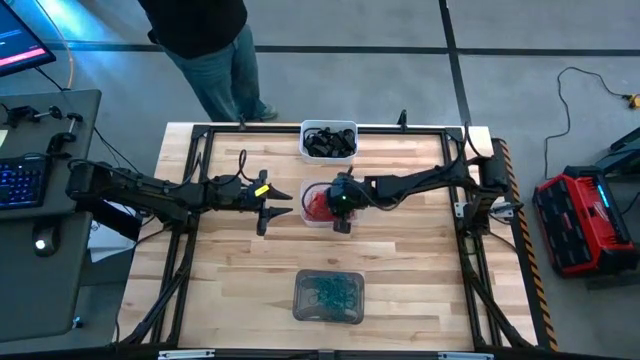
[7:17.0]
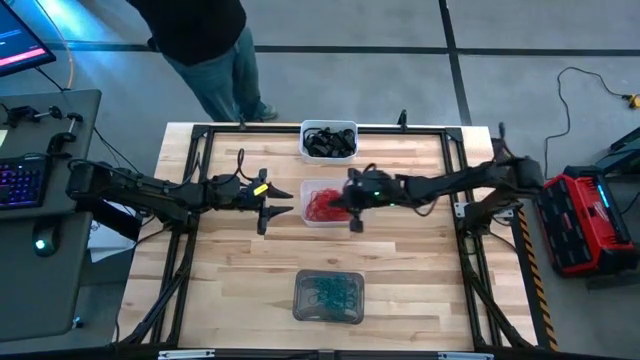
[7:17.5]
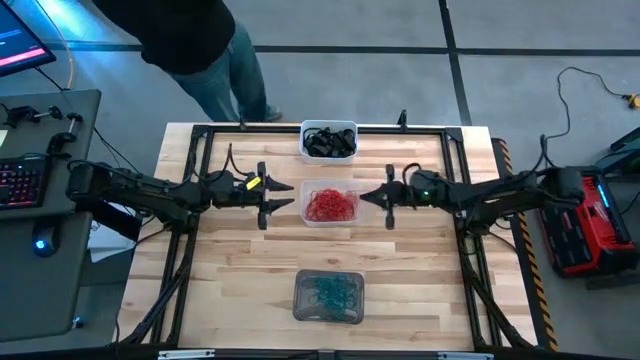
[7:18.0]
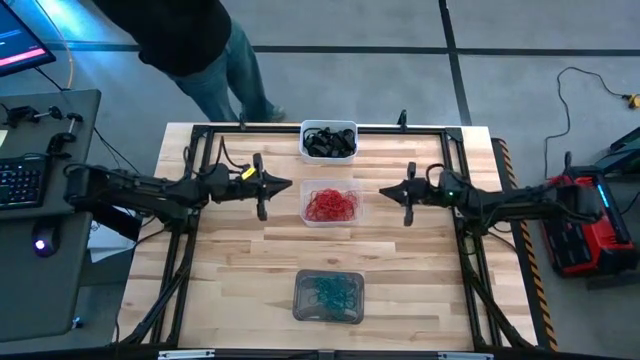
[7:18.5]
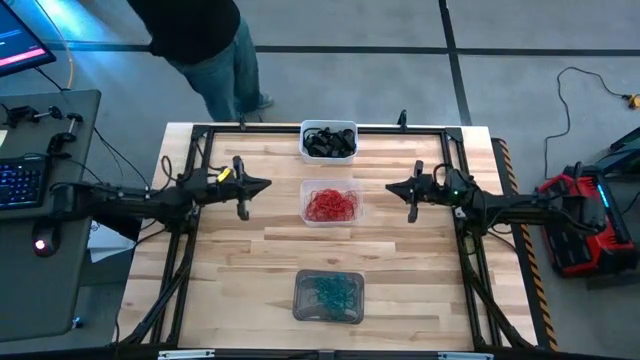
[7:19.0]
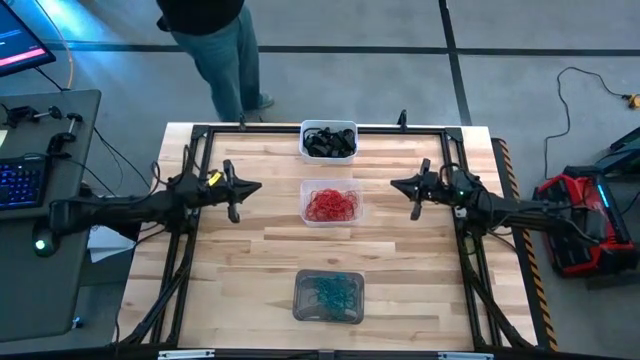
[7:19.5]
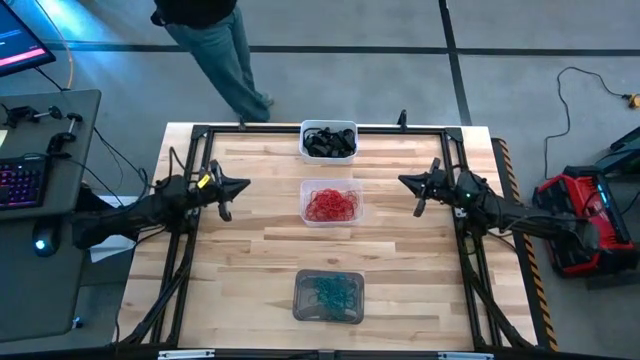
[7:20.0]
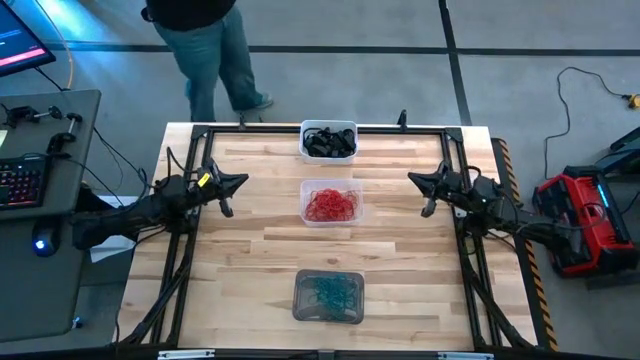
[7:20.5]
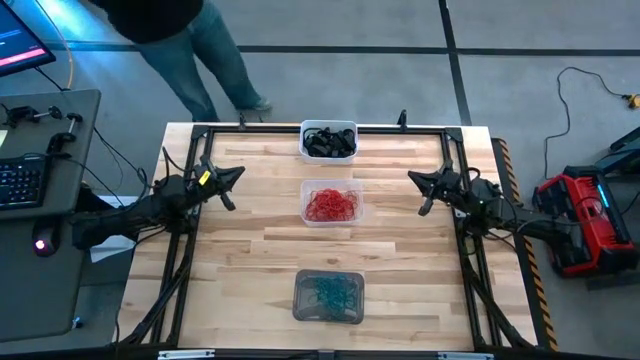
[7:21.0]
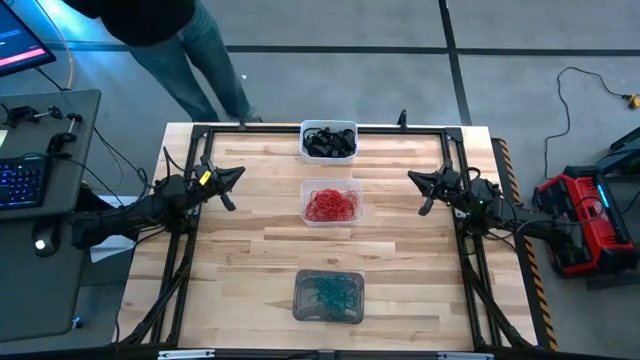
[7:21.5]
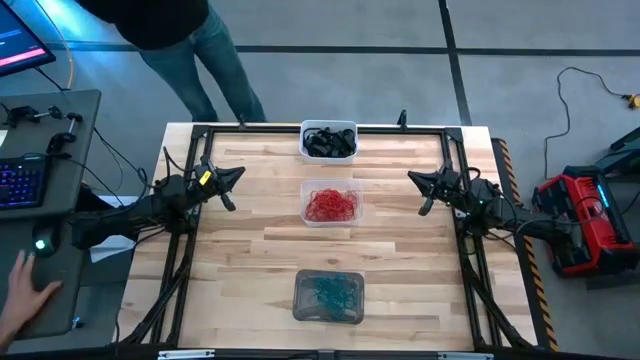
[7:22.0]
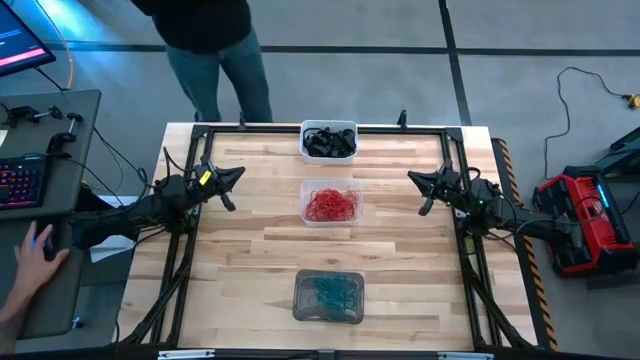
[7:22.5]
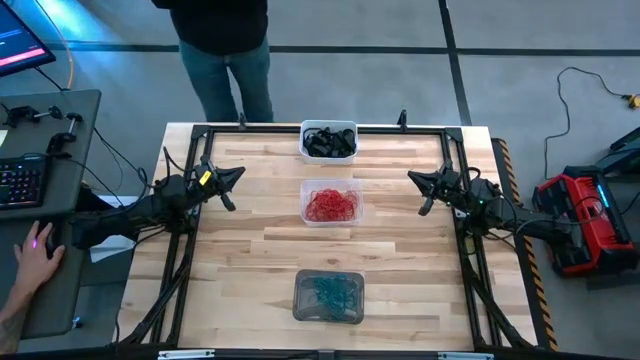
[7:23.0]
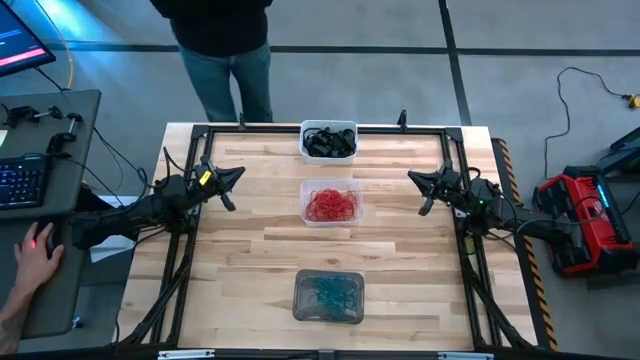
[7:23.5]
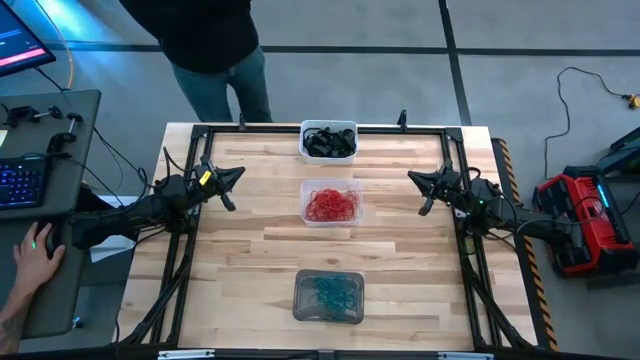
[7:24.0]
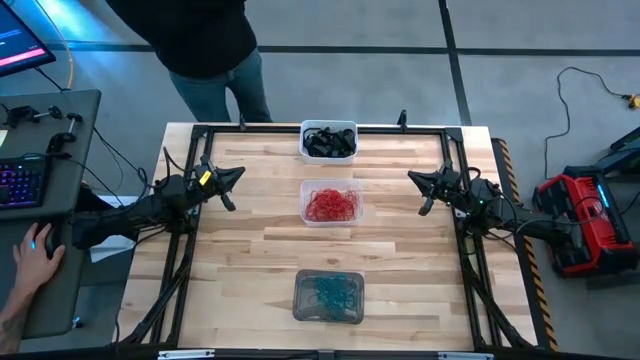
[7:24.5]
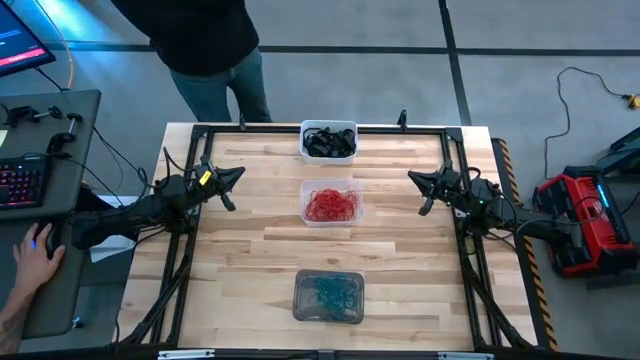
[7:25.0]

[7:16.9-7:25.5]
Task: Sort rubber bands into baskets
Return to Home Position

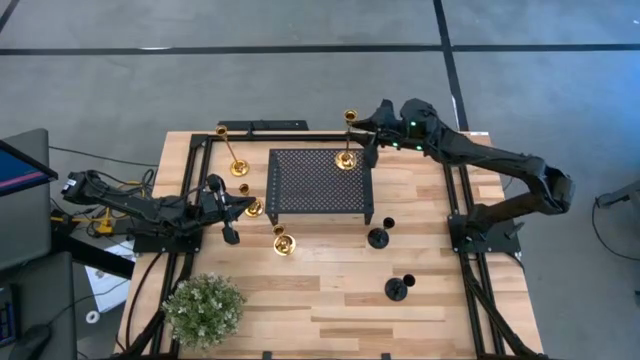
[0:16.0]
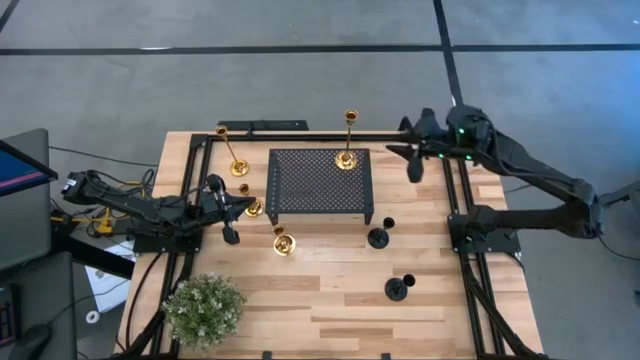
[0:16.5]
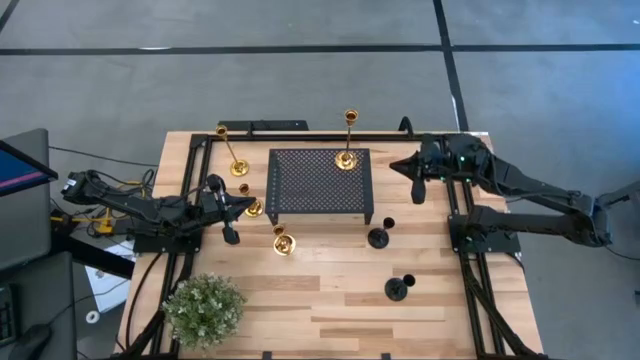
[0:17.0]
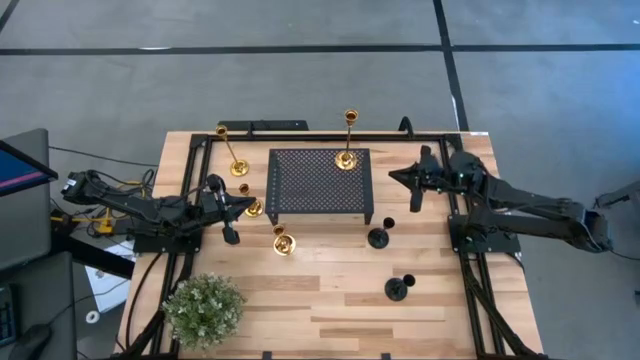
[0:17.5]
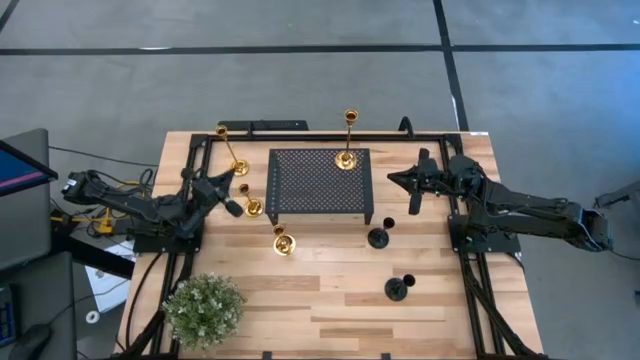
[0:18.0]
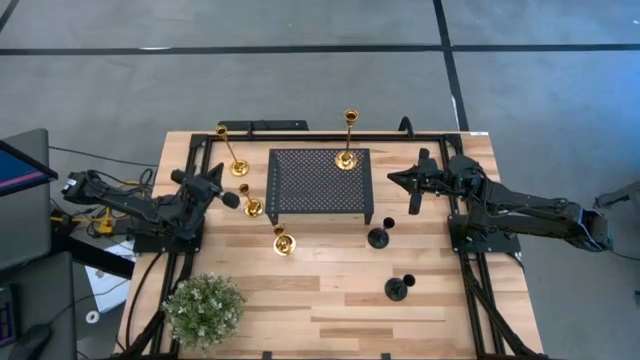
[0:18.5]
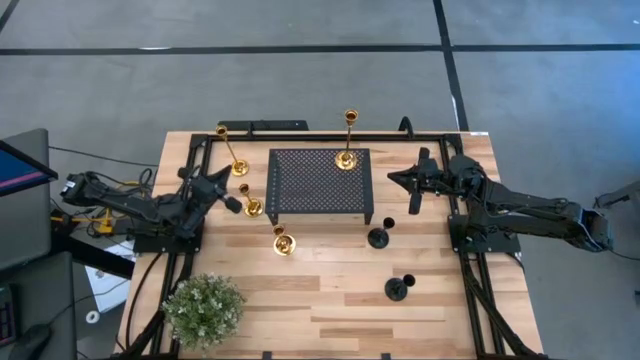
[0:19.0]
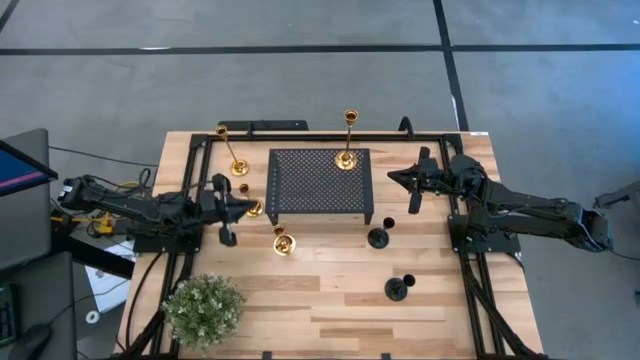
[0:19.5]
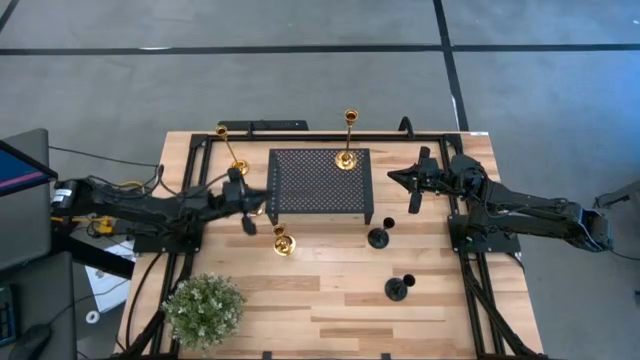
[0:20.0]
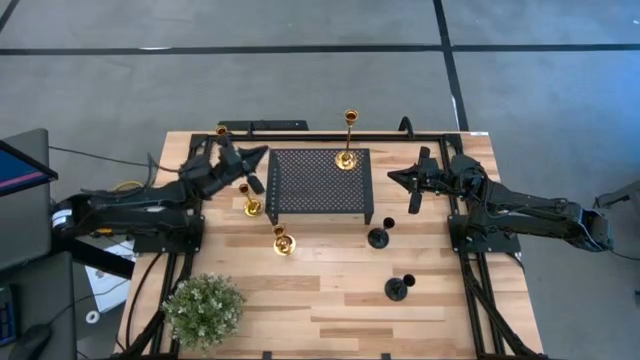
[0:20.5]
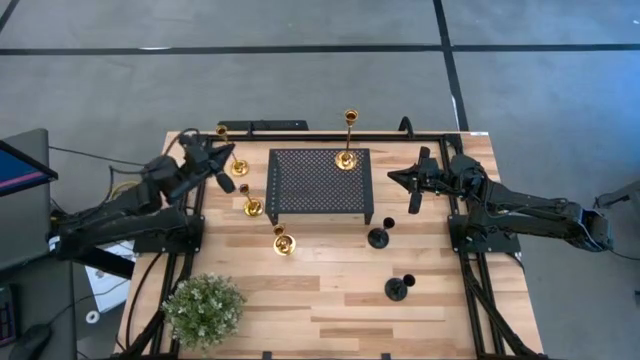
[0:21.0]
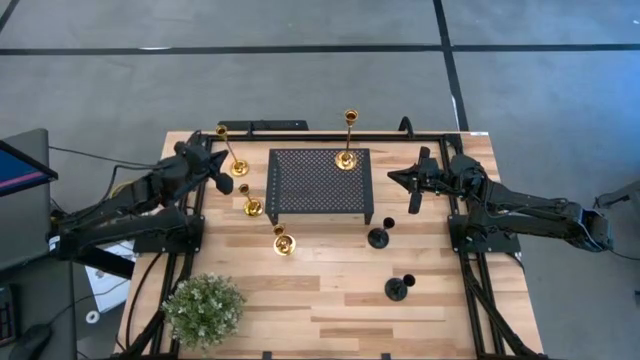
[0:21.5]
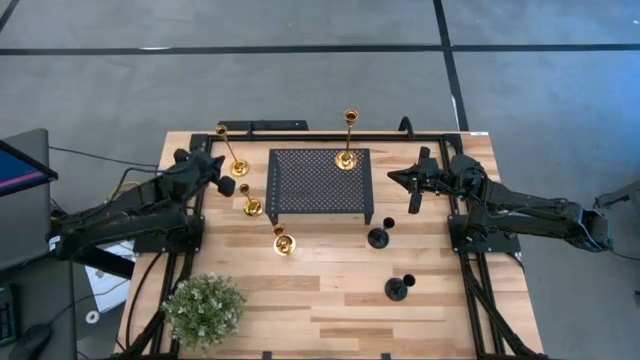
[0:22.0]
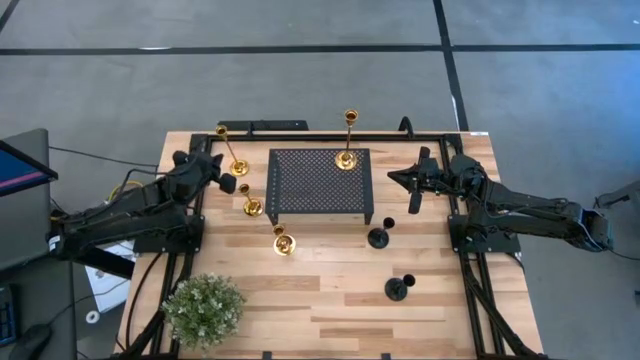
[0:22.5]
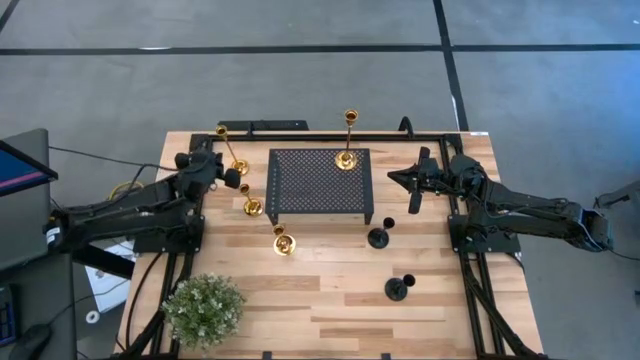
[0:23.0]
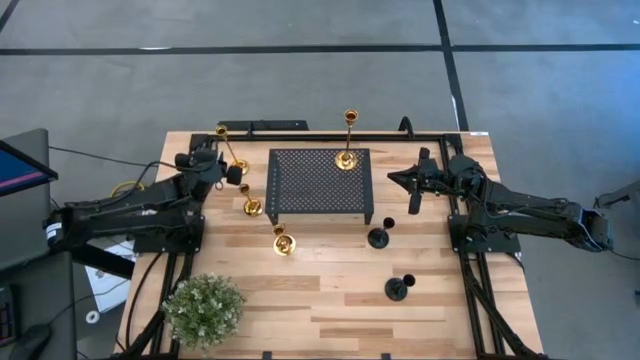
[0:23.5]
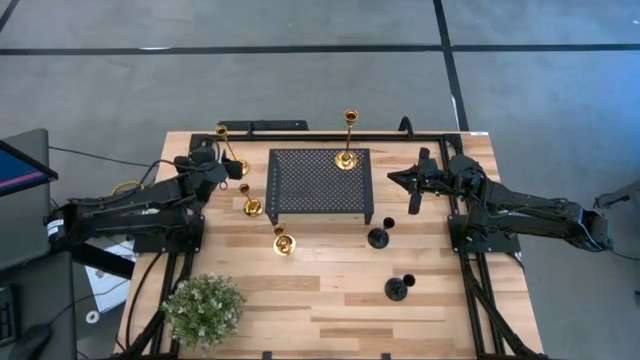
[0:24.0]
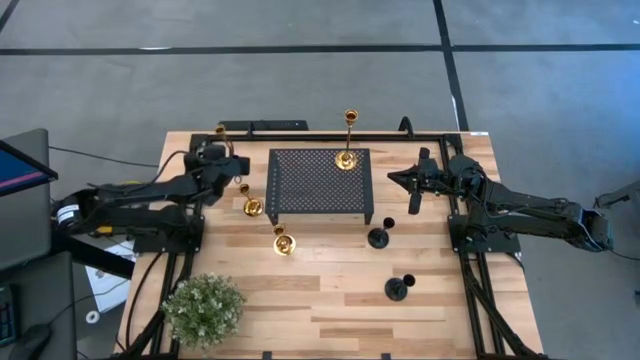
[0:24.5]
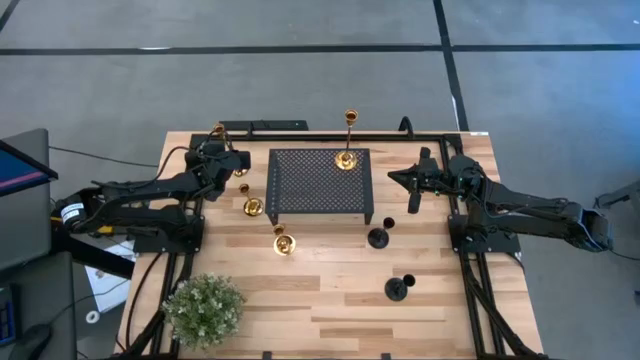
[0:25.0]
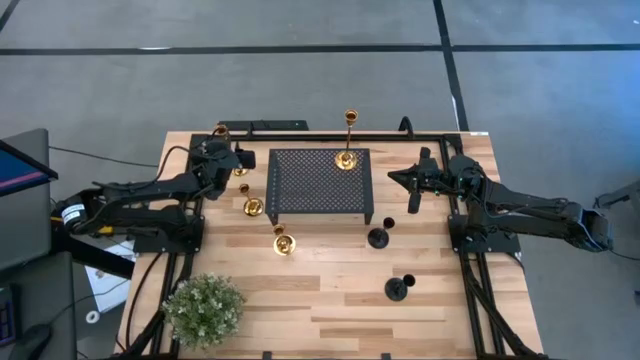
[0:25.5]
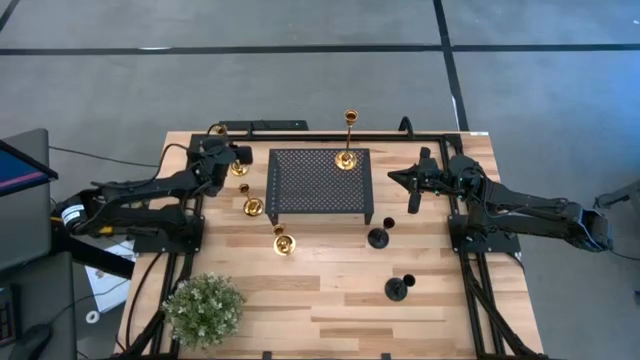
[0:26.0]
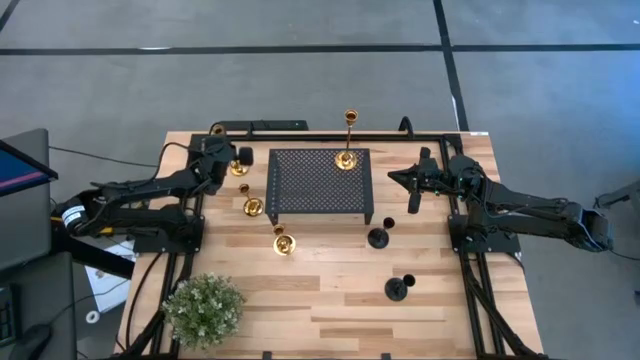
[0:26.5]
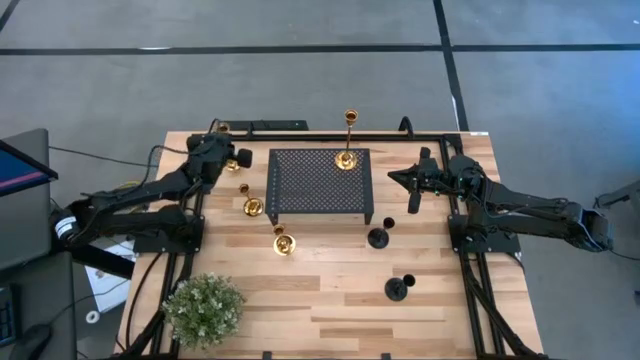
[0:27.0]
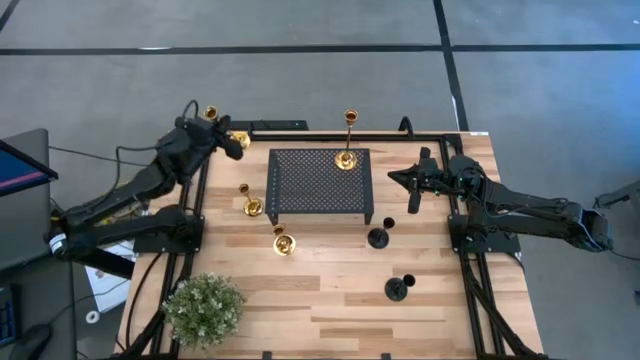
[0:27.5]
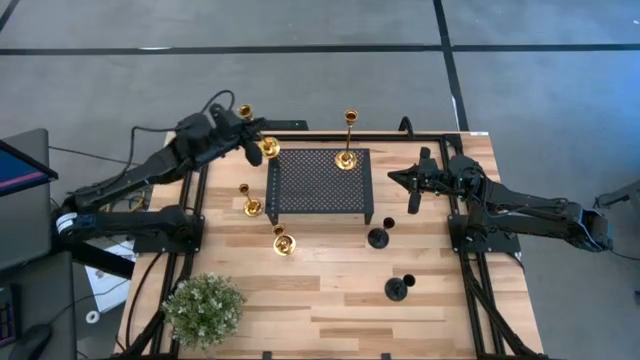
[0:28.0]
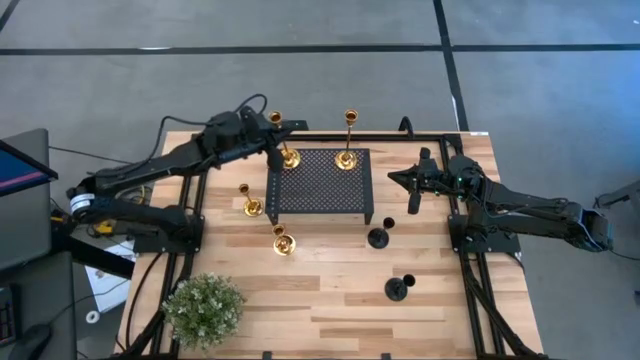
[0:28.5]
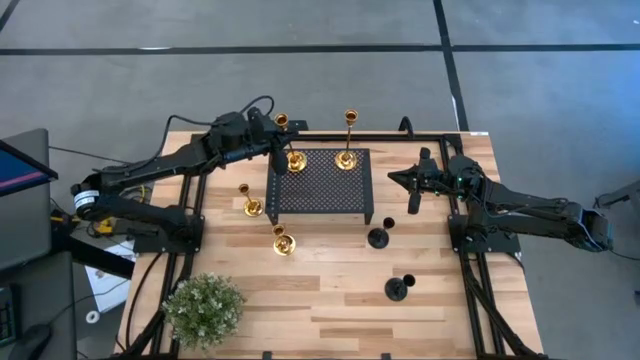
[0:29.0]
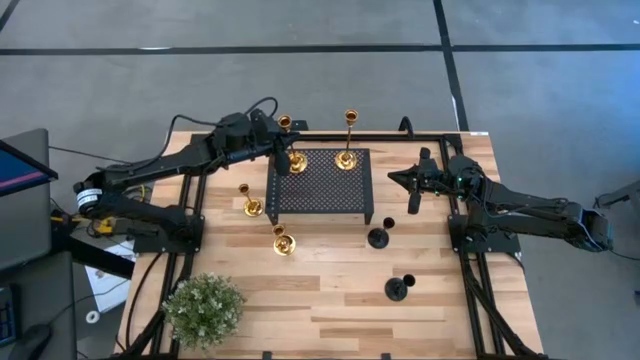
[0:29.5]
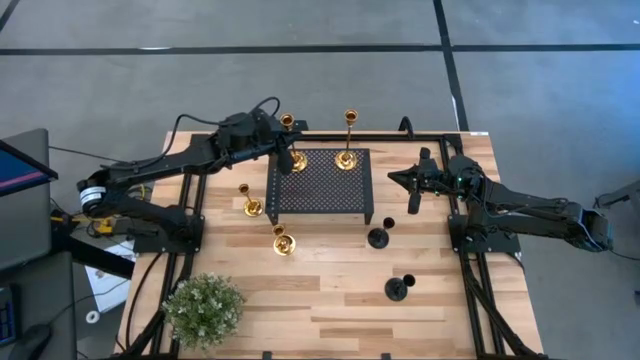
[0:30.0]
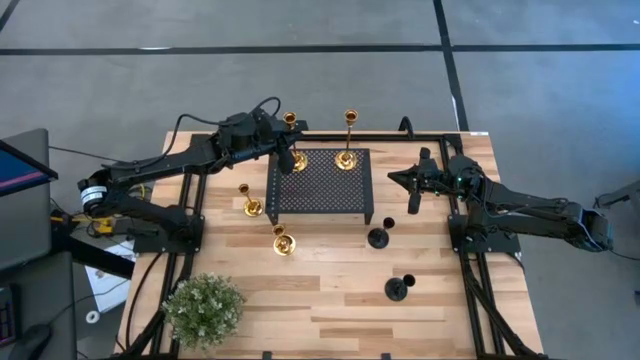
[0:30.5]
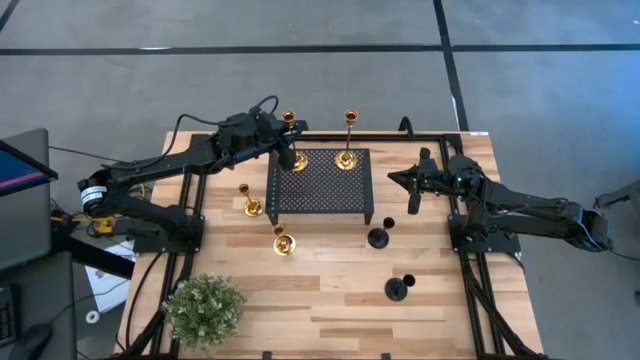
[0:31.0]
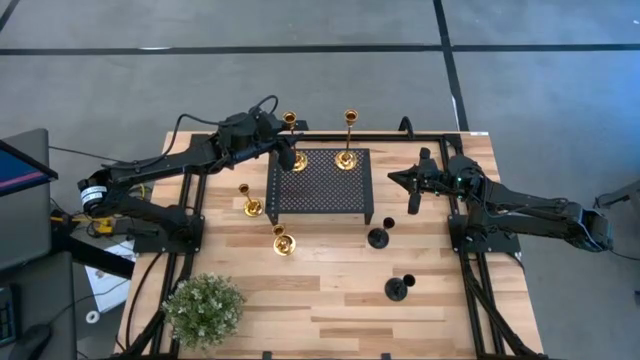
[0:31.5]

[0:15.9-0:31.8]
Task: Pick & Place candle stick holders
Put the golden candle holder on the shelf
